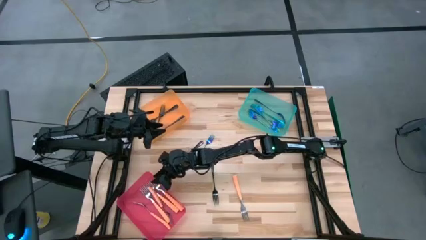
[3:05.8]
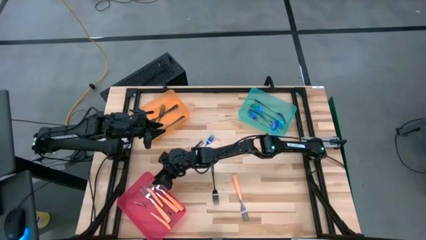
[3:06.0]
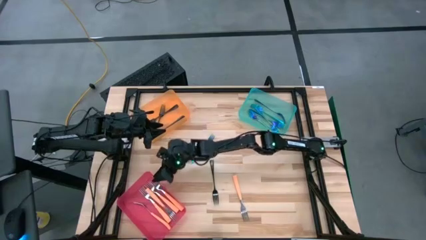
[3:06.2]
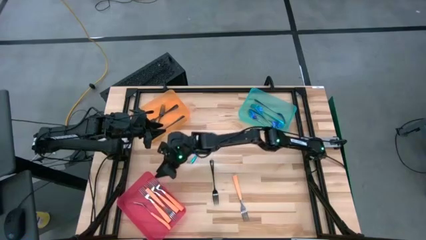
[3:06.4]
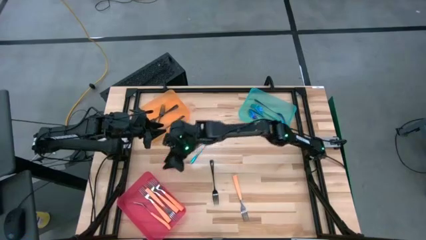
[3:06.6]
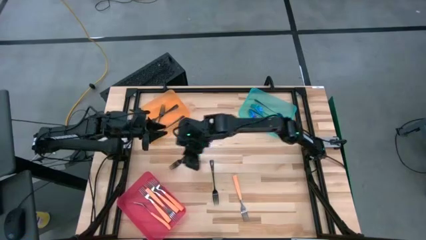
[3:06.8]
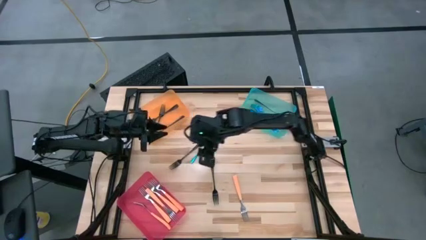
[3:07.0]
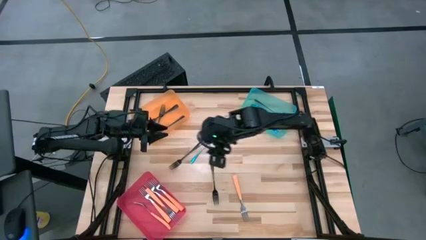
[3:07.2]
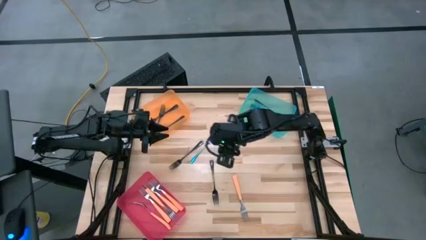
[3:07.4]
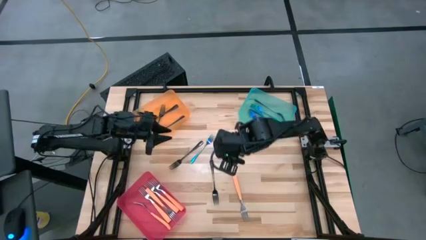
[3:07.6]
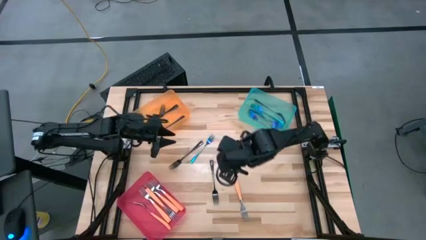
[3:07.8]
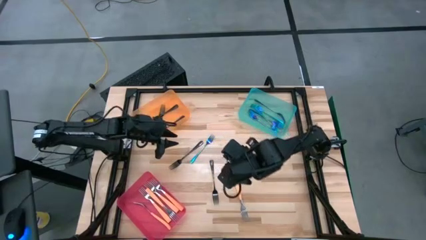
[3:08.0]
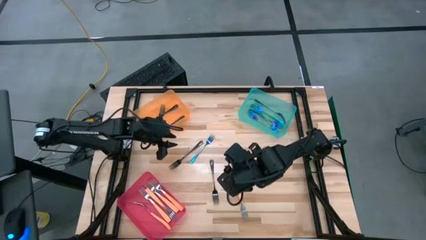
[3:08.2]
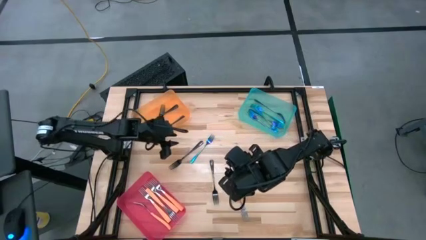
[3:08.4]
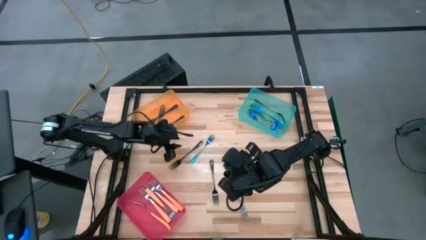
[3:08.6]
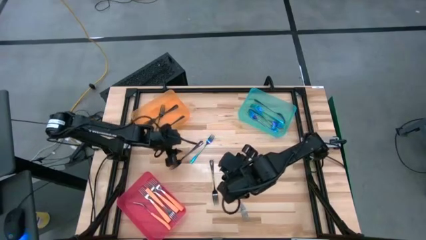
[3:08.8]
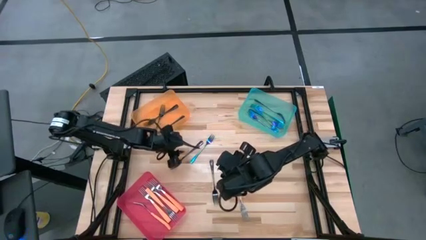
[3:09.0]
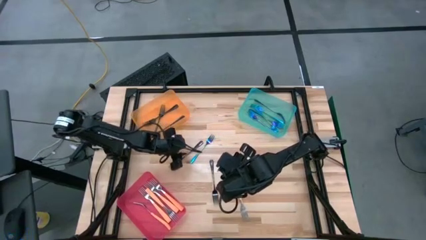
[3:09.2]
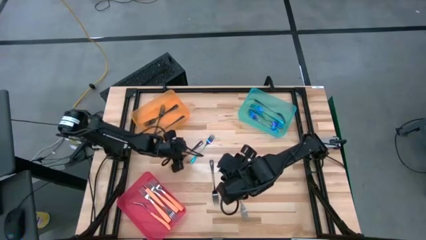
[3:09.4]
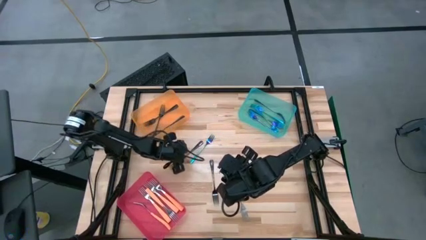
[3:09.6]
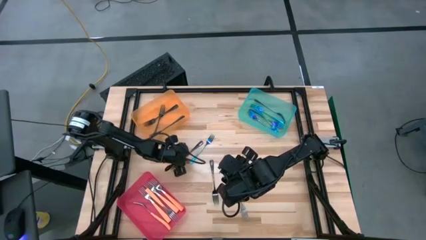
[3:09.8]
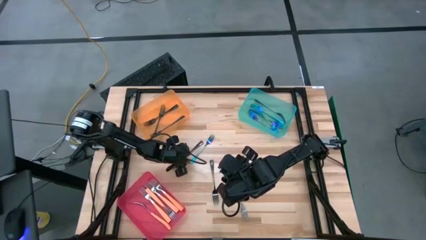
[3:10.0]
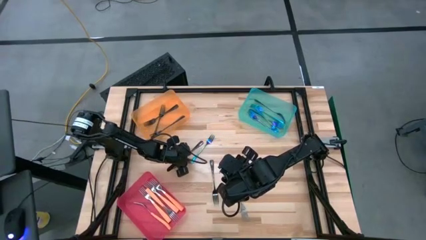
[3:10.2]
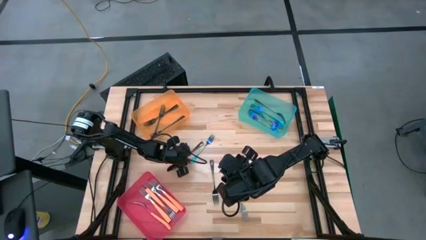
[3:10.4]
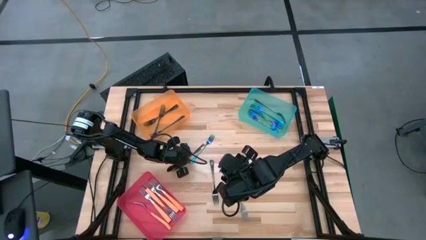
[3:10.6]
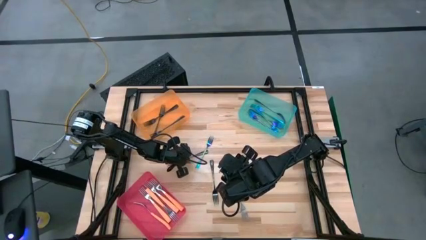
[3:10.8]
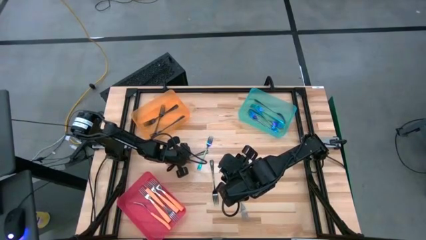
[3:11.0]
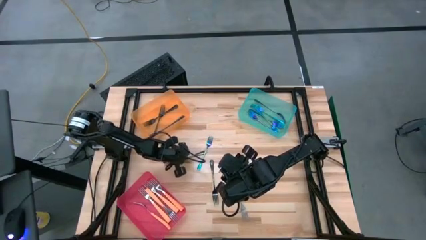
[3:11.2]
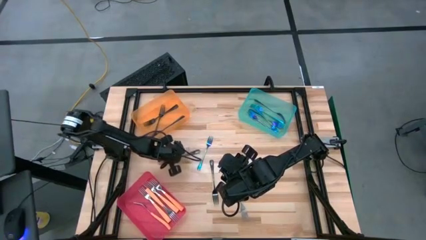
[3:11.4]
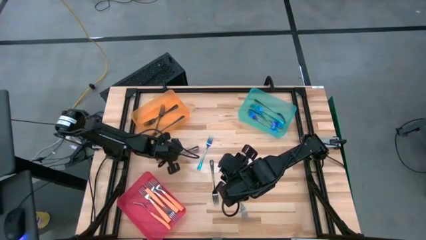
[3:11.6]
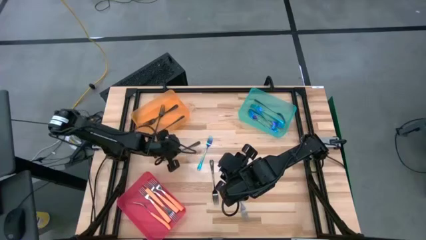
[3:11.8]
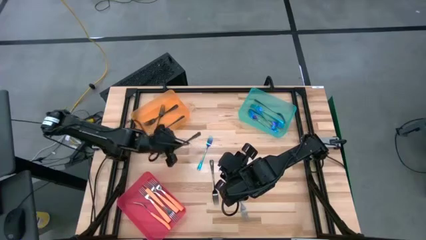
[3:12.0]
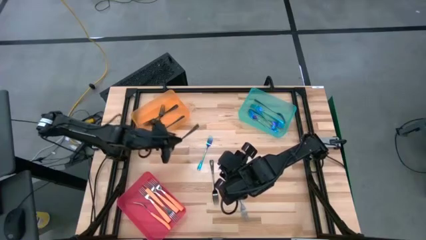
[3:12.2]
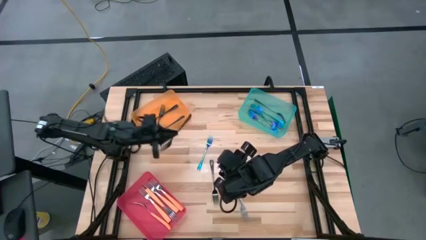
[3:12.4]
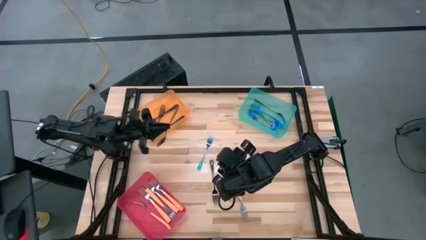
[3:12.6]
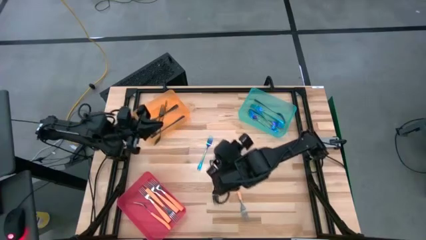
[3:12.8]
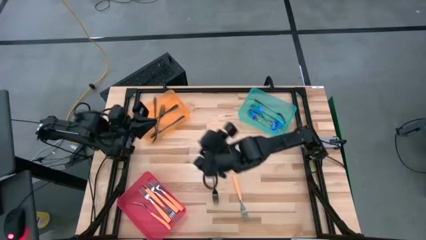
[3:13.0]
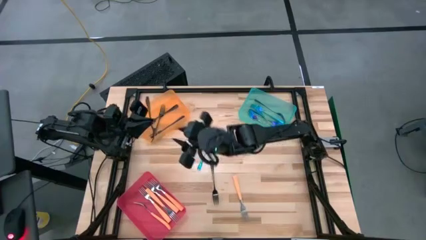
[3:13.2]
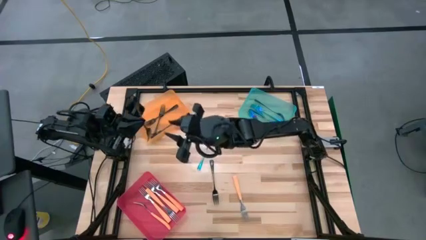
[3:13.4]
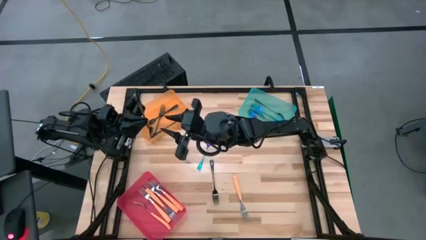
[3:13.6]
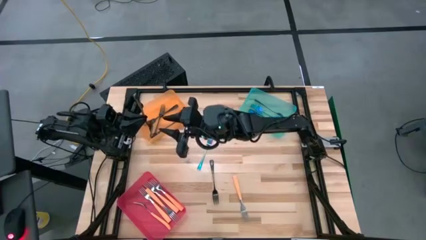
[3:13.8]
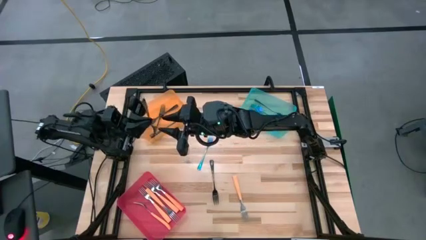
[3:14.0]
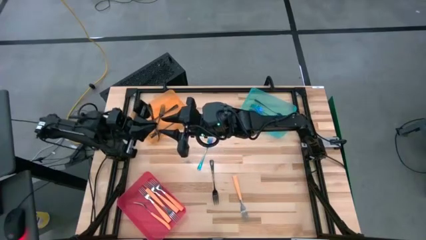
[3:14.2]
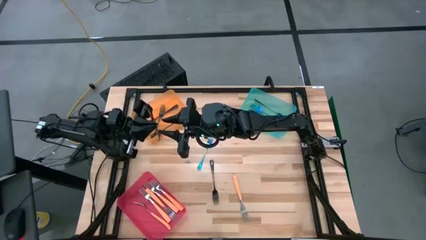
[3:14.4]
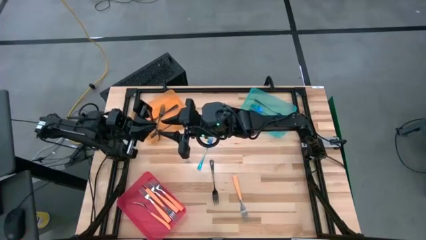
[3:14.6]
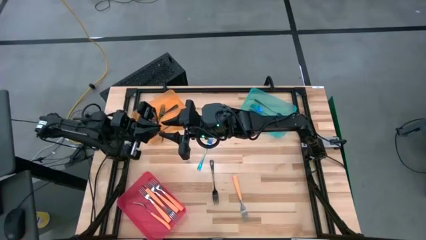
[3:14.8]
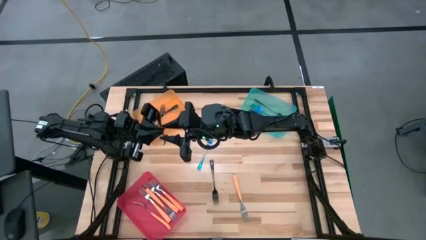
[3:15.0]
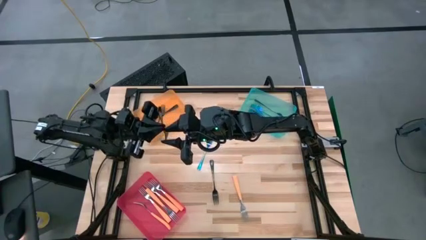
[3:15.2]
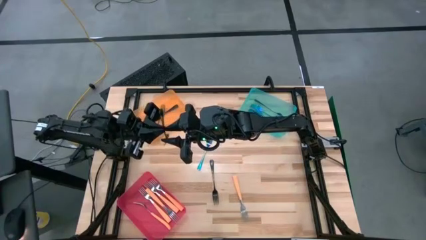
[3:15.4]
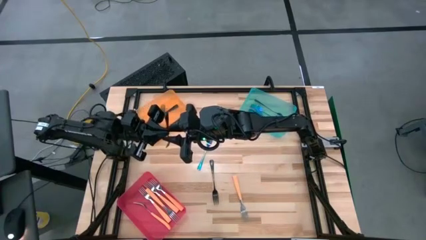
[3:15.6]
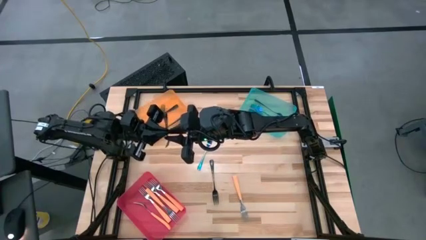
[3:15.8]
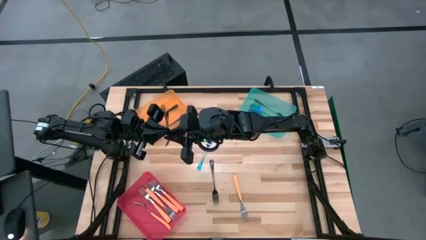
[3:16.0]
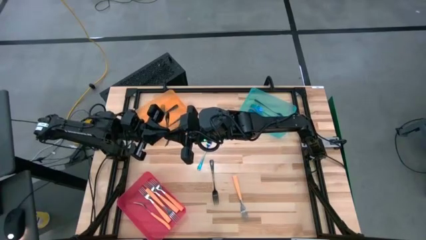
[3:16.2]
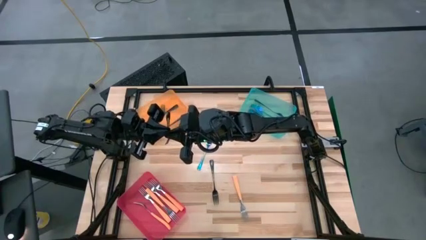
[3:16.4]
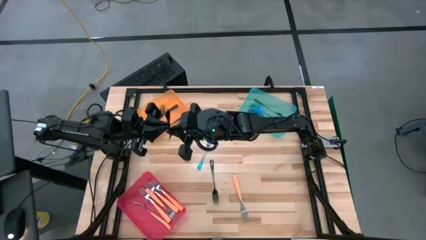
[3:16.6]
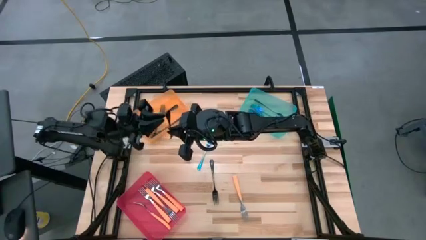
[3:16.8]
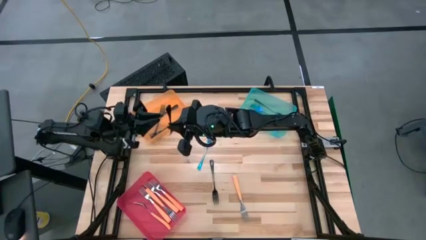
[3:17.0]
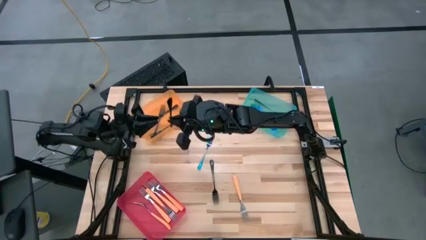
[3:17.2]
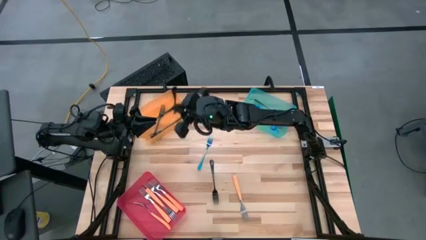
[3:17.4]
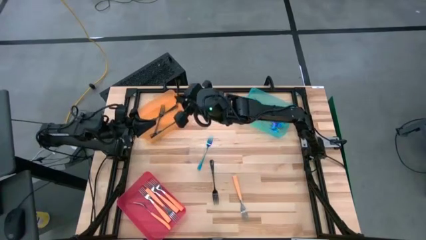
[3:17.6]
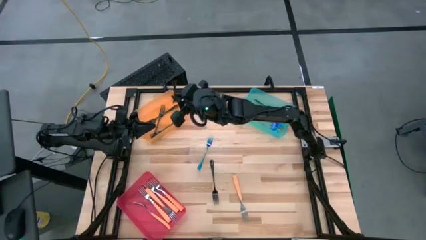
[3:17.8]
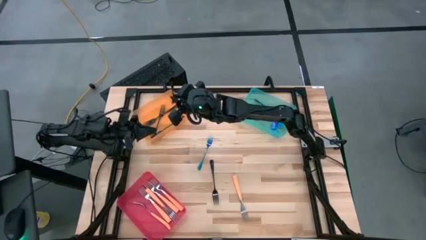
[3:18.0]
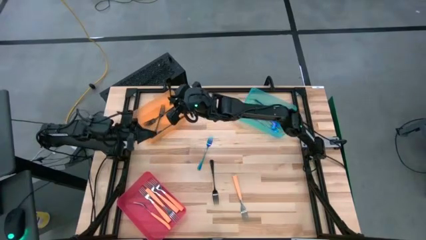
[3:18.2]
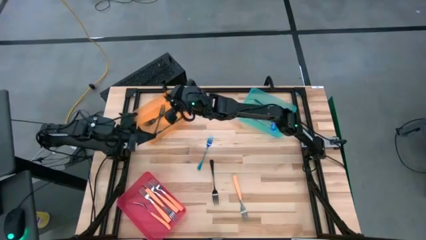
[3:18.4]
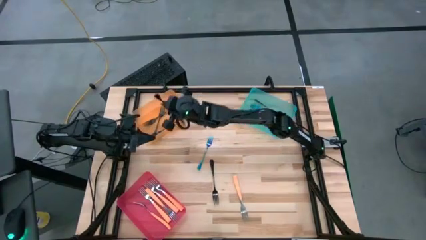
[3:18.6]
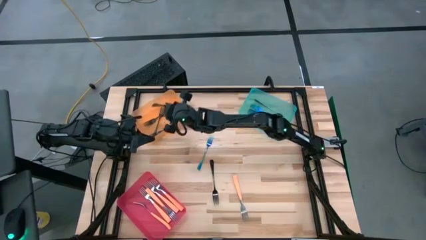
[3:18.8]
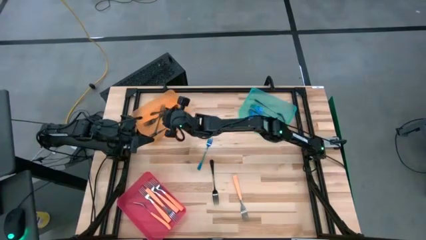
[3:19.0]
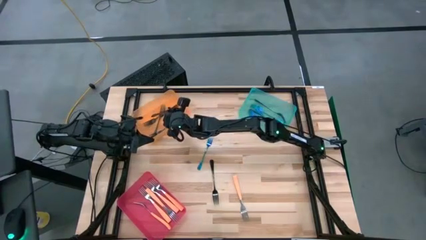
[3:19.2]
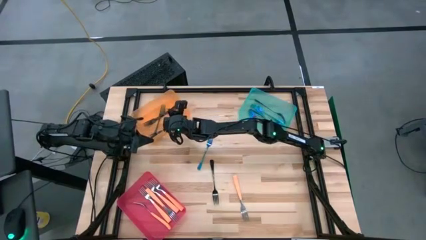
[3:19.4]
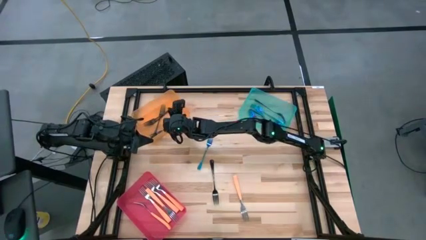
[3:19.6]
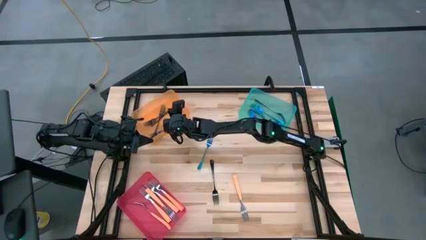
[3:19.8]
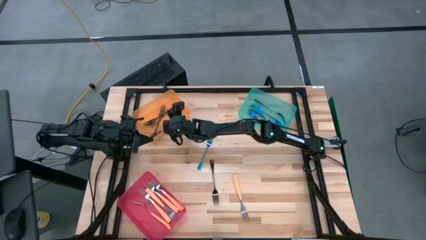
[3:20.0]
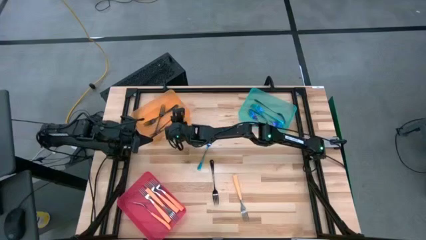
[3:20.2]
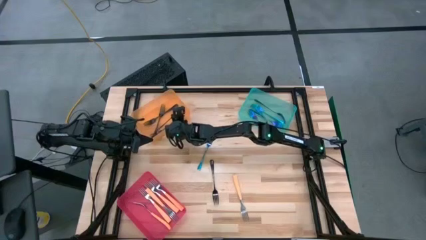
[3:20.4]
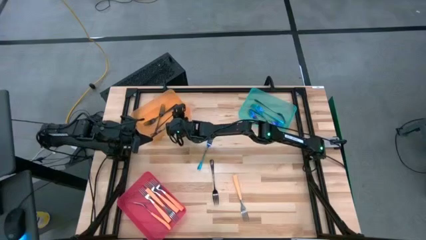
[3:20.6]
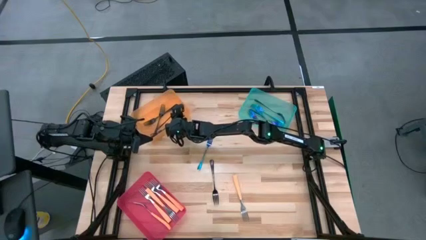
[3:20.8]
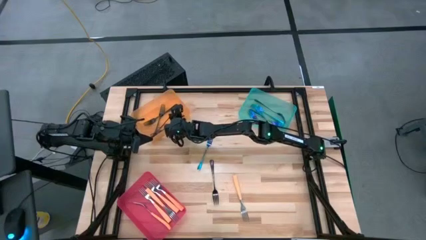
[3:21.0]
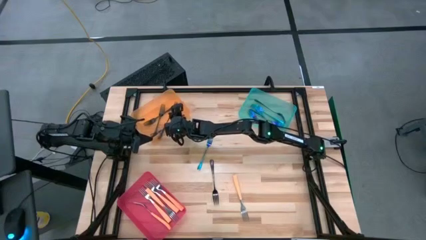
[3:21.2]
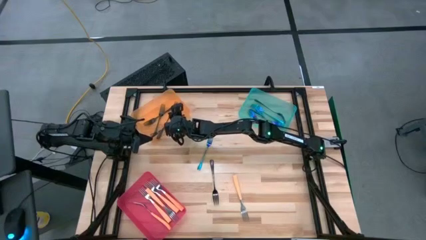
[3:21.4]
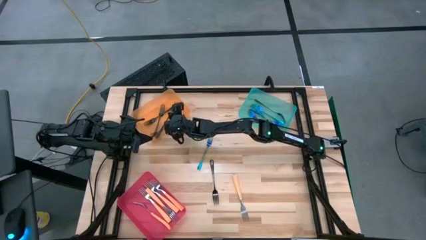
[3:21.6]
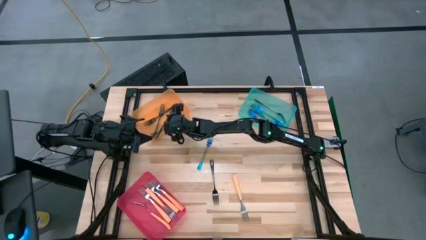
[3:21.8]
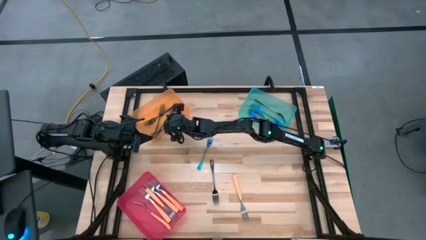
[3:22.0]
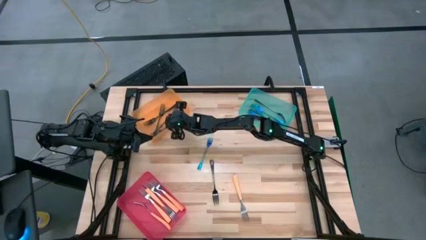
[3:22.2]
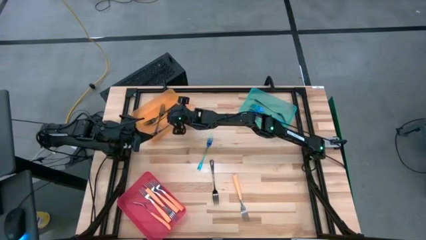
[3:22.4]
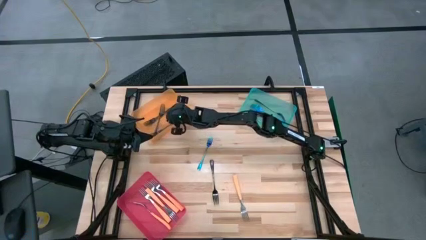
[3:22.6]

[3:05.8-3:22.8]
Task: Sort silverware by color (type)
Put the black fork into the orange bin
